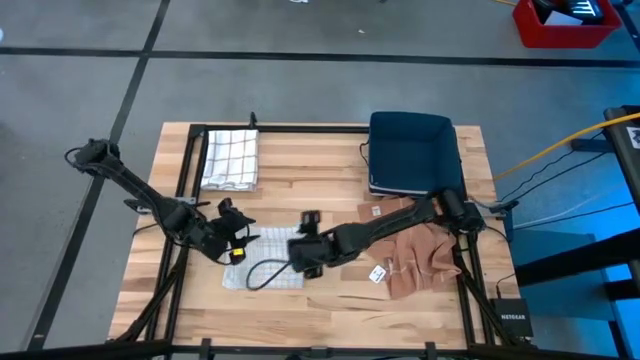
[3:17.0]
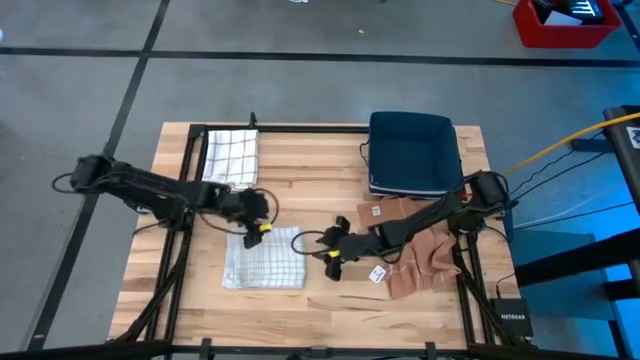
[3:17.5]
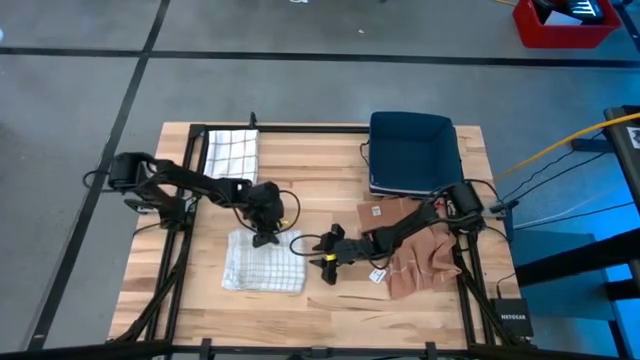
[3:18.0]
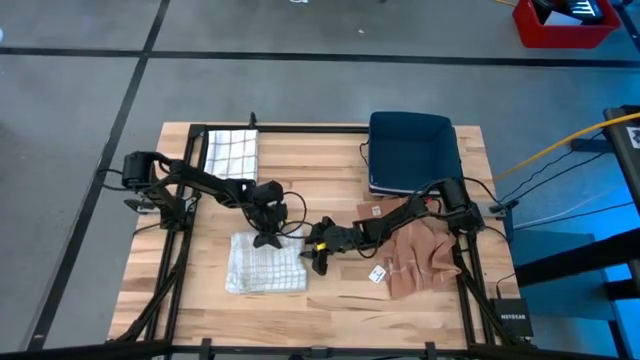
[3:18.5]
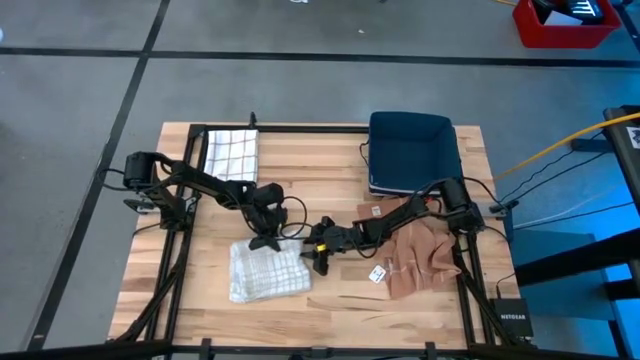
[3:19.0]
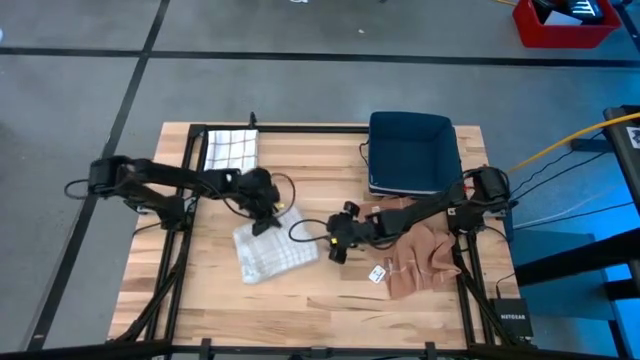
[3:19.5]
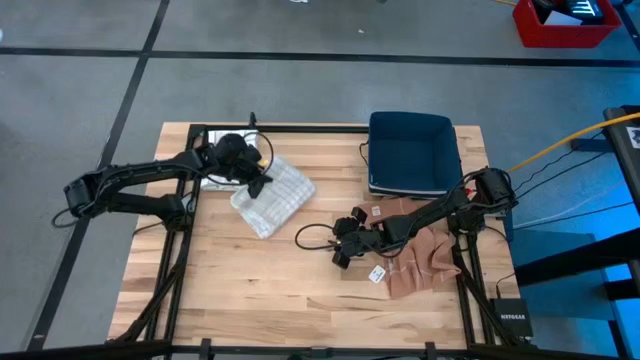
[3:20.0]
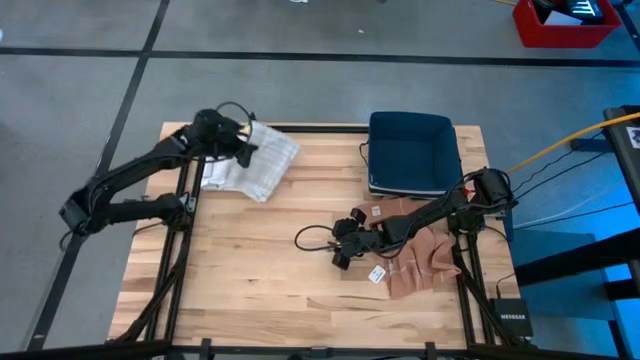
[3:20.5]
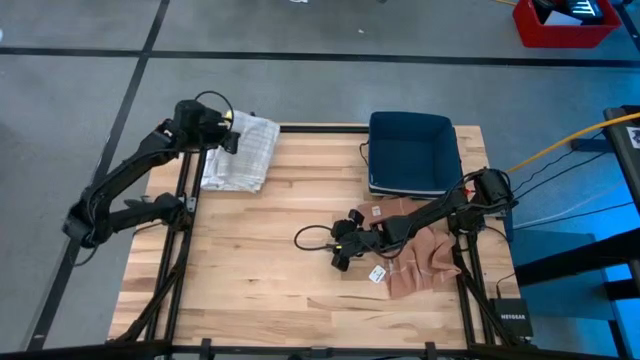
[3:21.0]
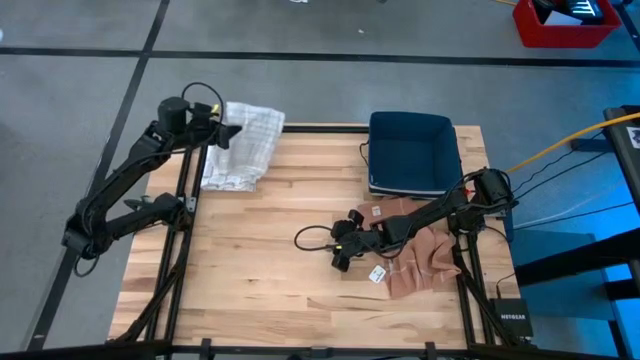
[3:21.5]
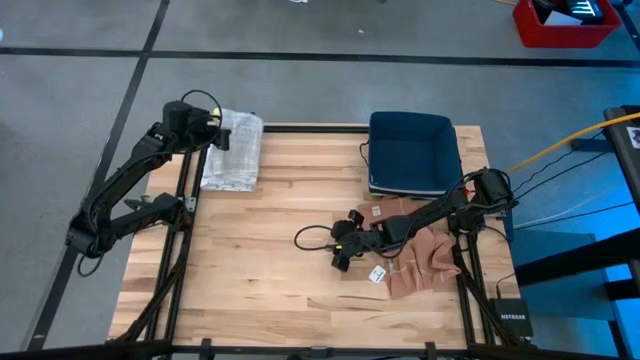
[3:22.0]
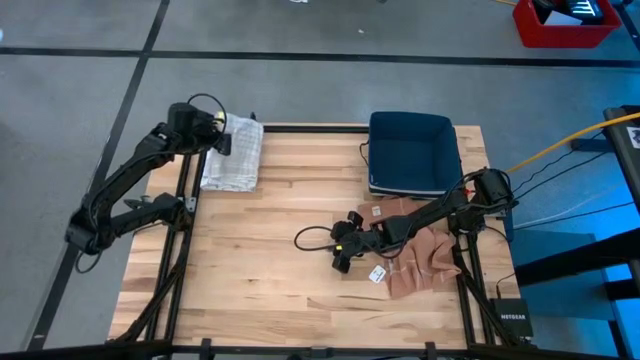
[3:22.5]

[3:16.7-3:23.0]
Task: Fold towel
Stack the white towel on top of the brown striped towel

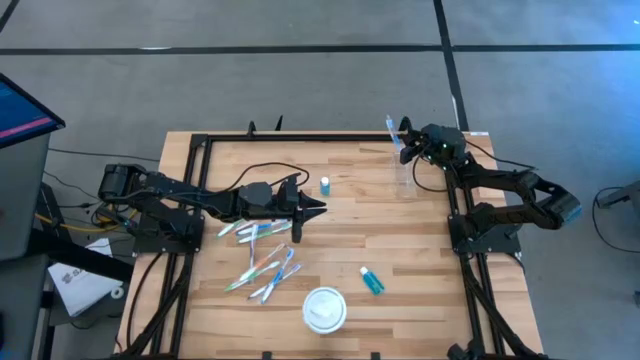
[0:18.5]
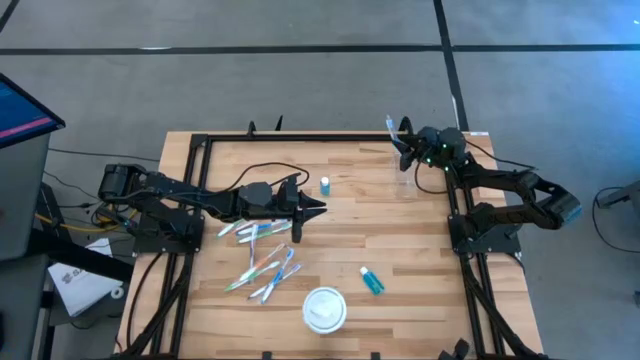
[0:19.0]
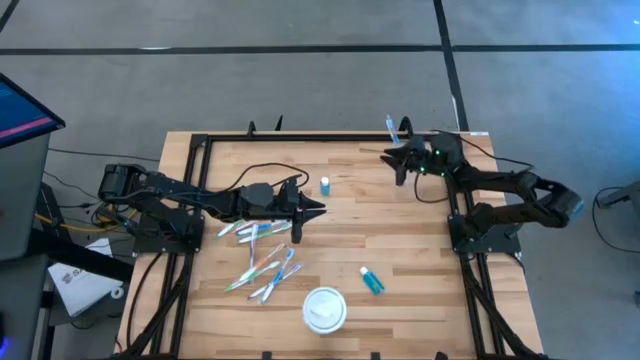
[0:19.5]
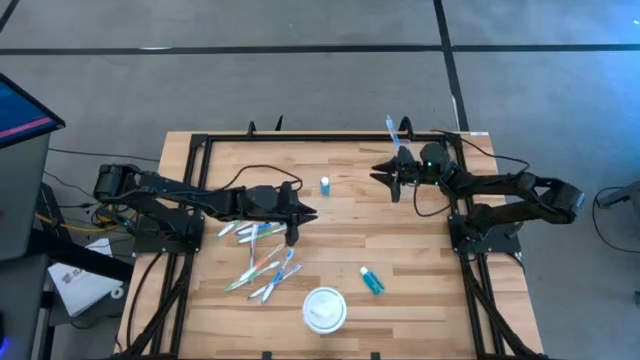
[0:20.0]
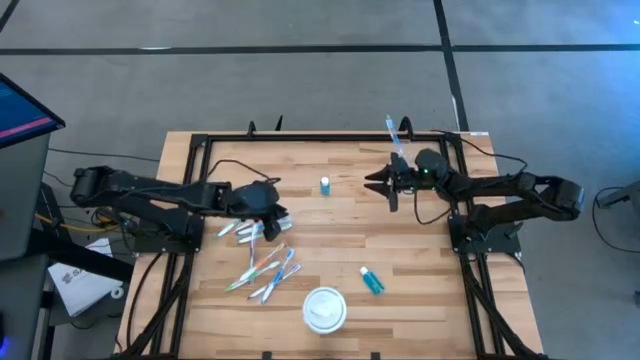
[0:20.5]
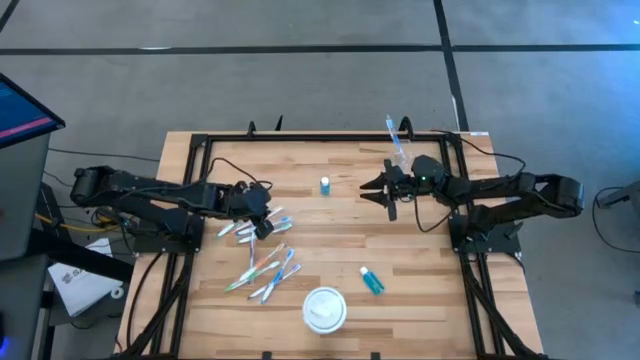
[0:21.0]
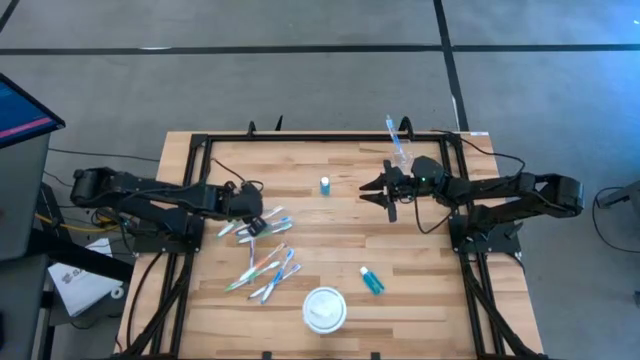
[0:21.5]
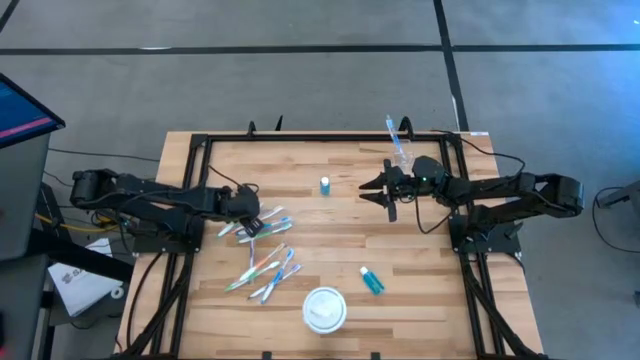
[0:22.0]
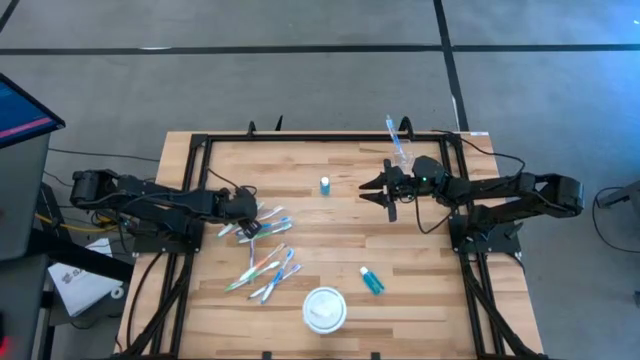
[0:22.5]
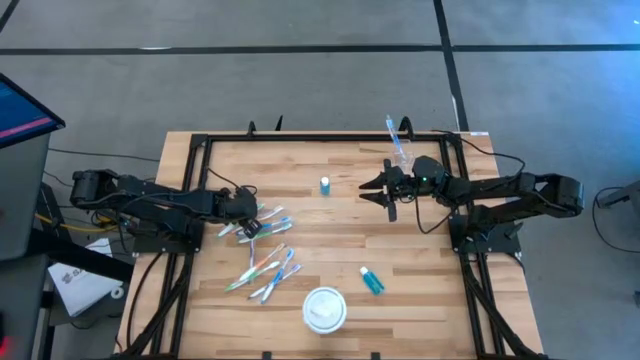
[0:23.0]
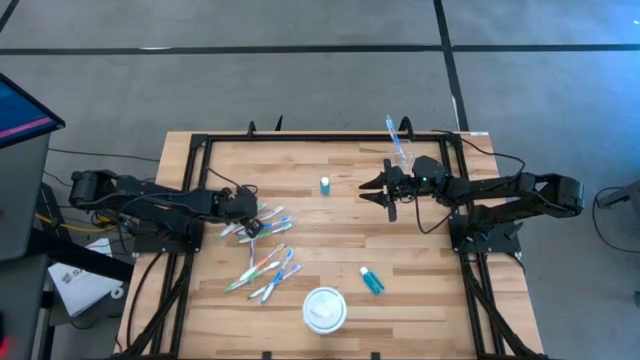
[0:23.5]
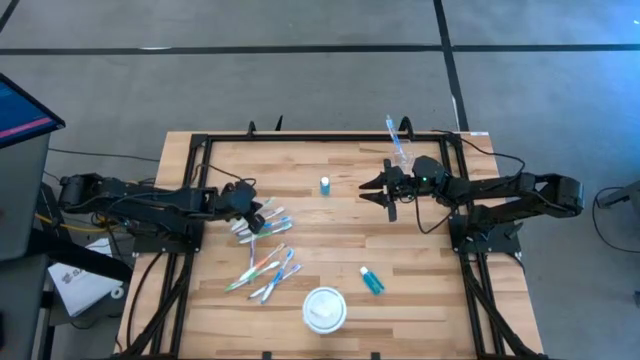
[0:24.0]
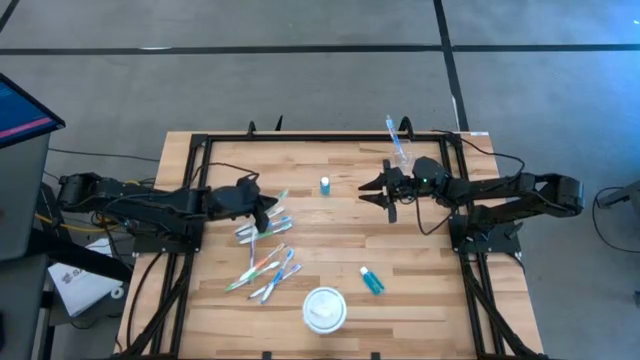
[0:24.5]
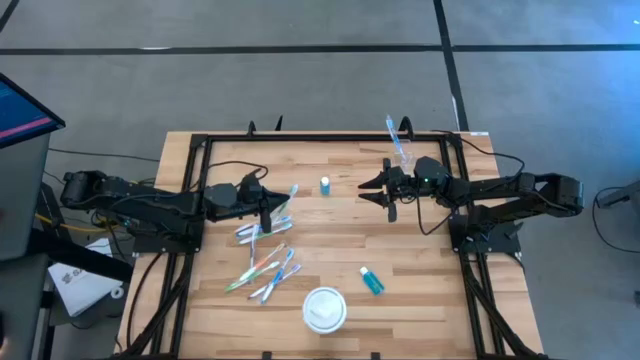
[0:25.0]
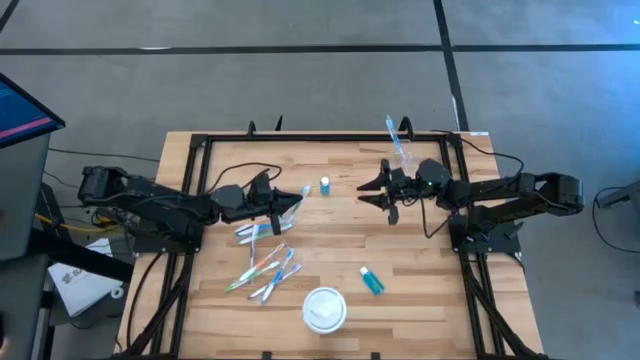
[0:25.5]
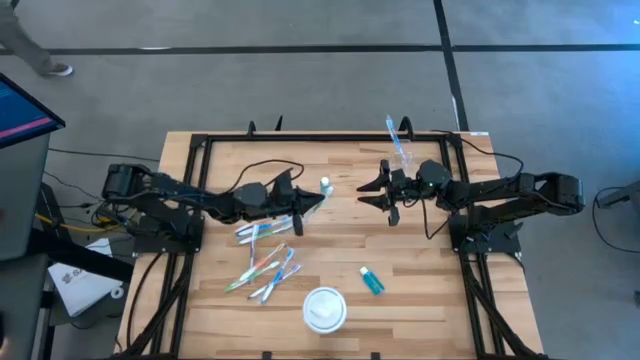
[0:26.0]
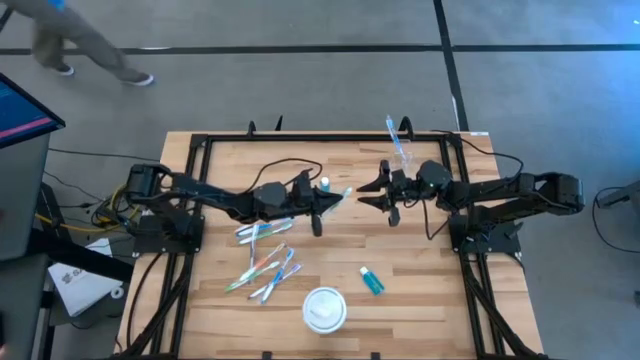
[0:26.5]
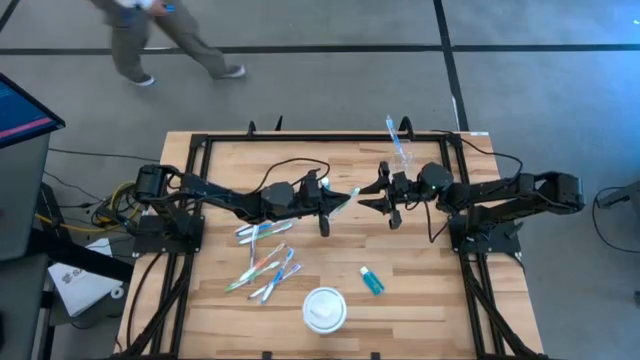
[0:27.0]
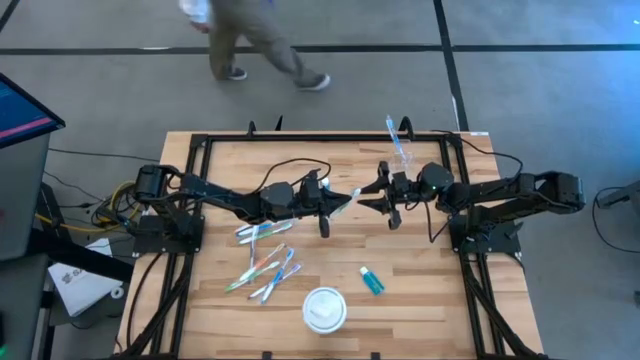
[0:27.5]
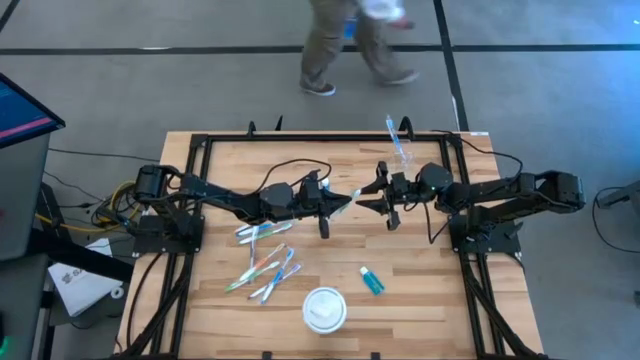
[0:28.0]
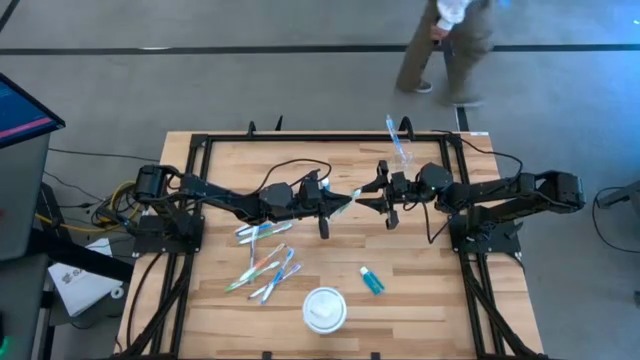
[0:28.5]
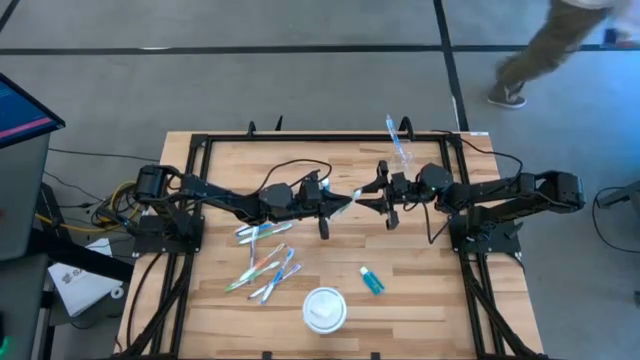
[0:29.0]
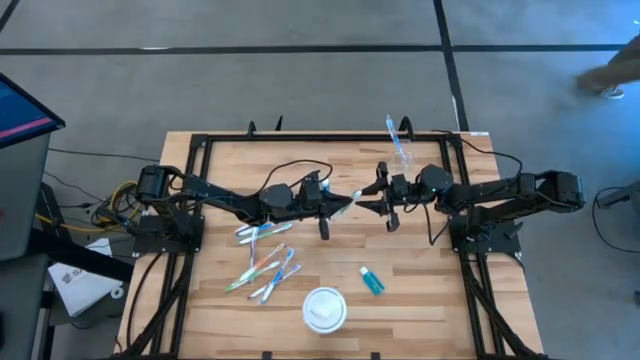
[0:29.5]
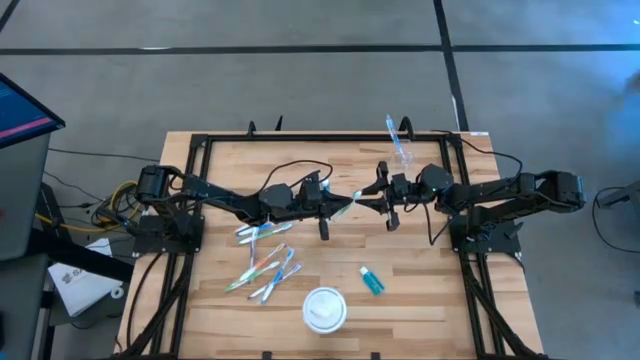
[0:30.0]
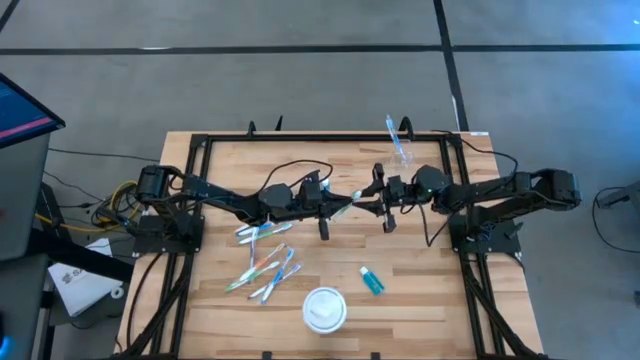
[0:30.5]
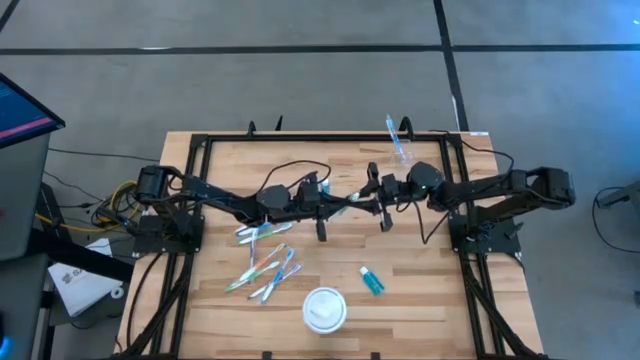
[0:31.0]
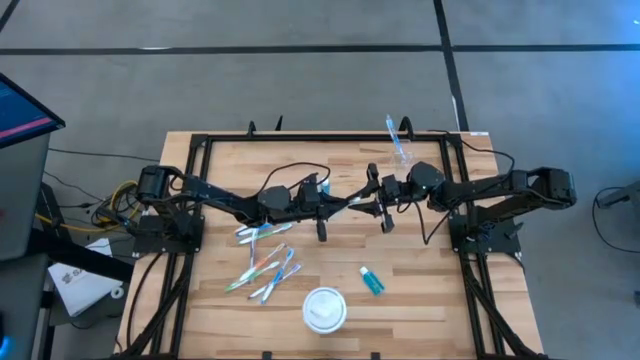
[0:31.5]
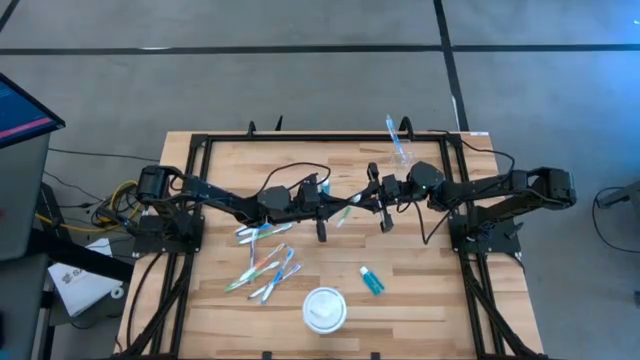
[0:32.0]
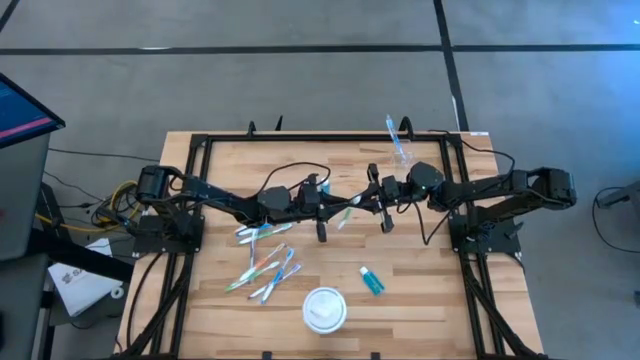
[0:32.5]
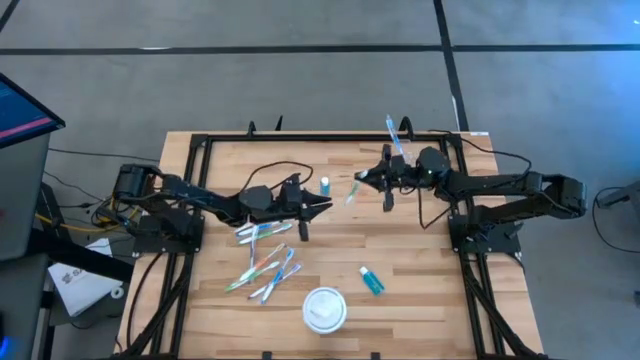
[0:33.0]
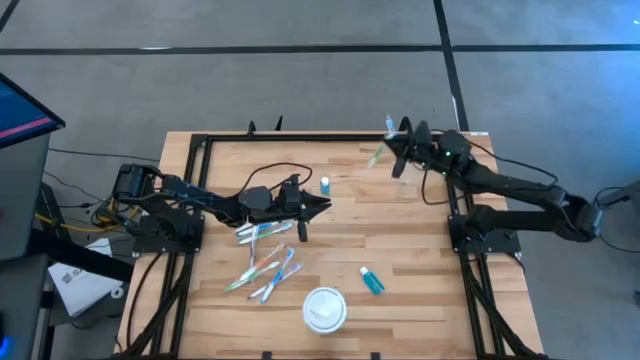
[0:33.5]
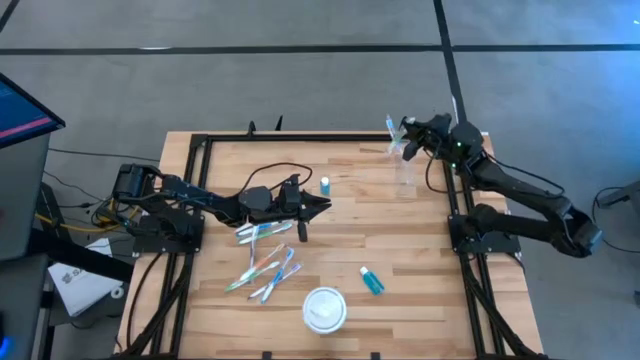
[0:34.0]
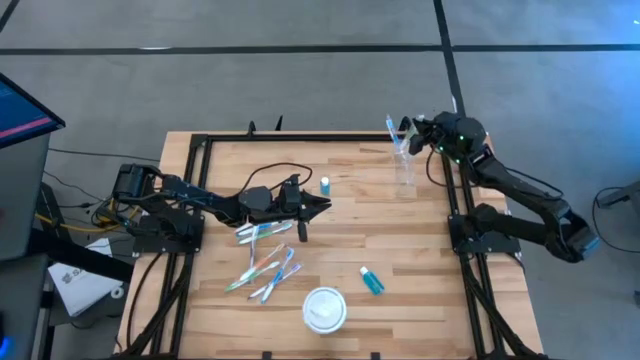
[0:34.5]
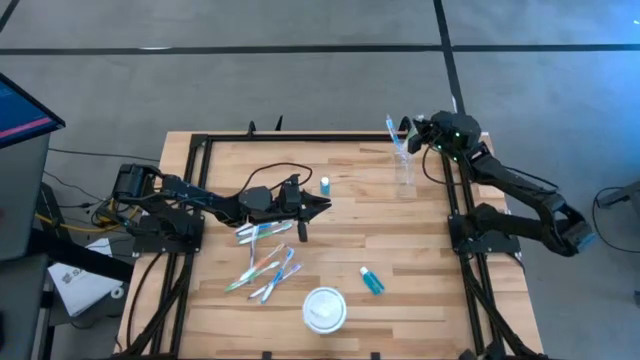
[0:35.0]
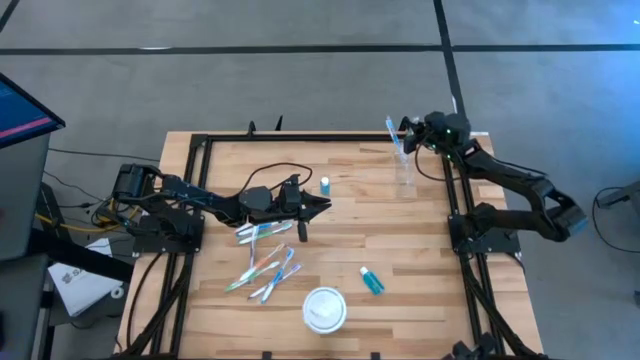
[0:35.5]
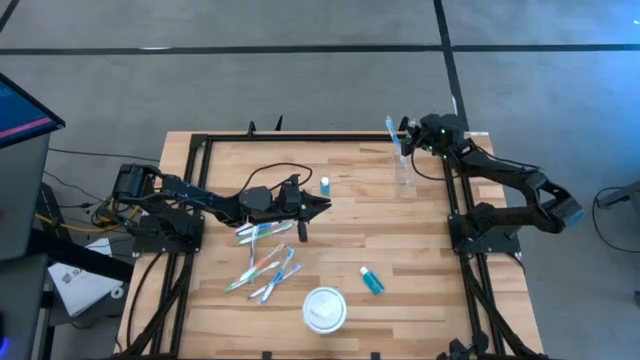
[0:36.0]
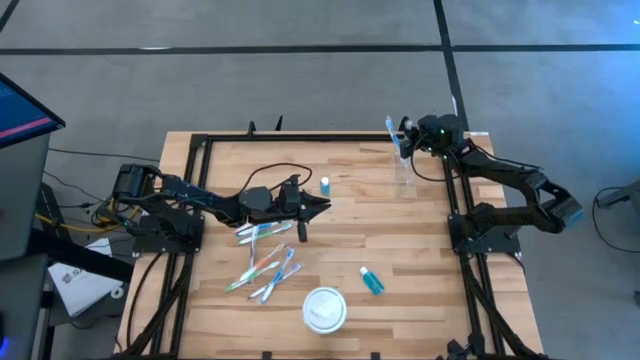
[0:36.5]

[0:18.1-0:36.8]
Task: Pick & Place toothbrushing station
Put the green toothbrush into the transparent organizer
